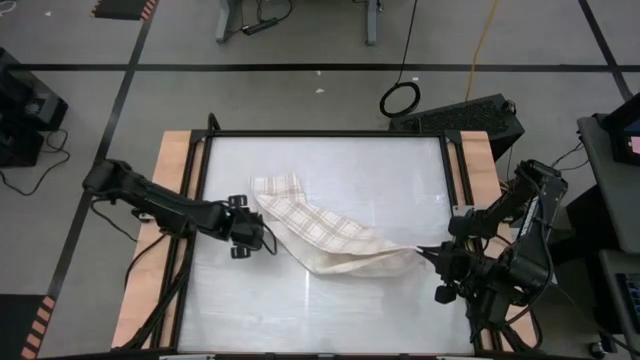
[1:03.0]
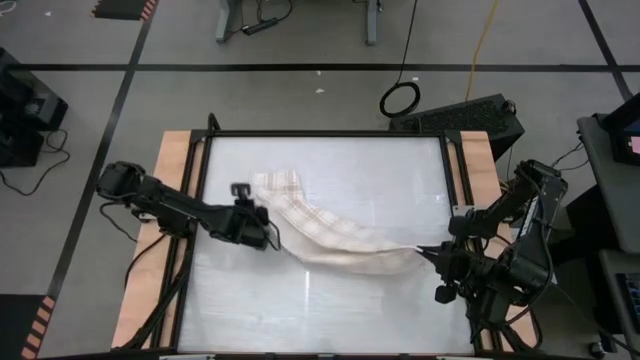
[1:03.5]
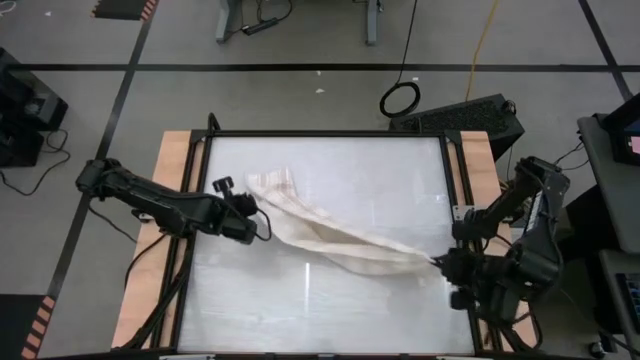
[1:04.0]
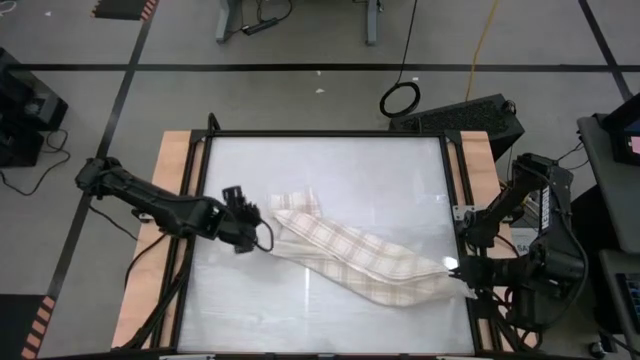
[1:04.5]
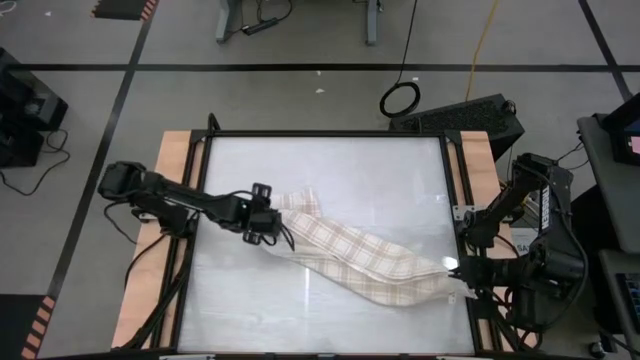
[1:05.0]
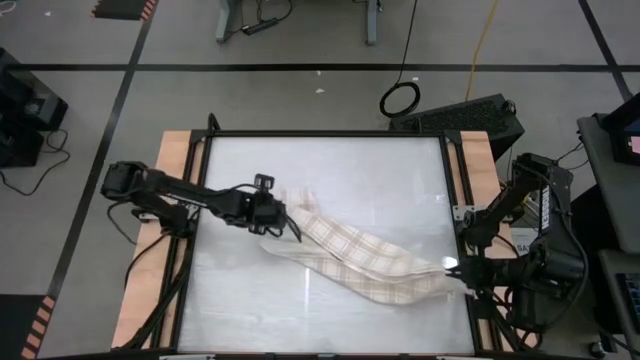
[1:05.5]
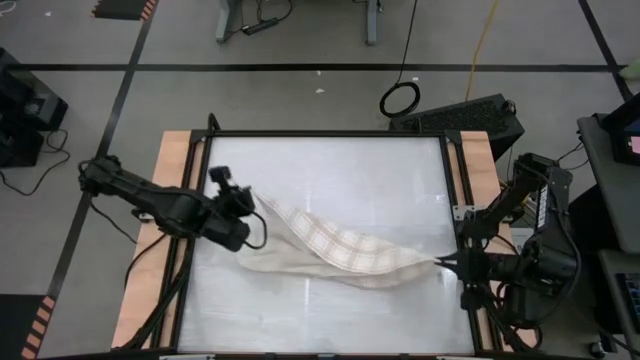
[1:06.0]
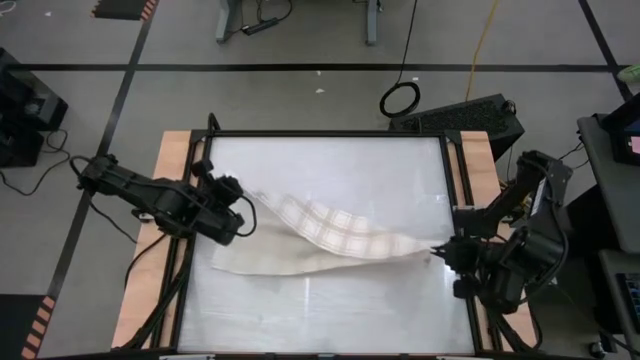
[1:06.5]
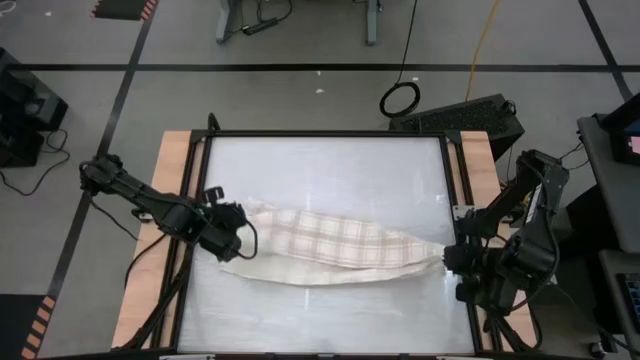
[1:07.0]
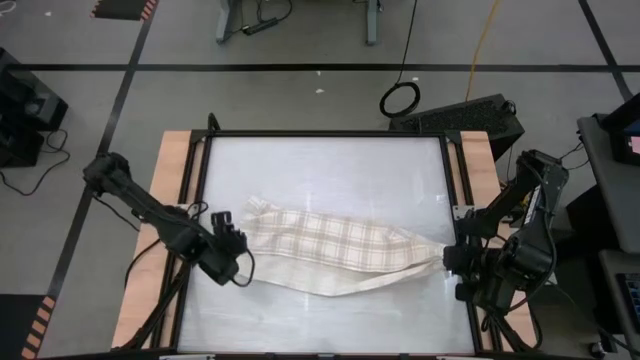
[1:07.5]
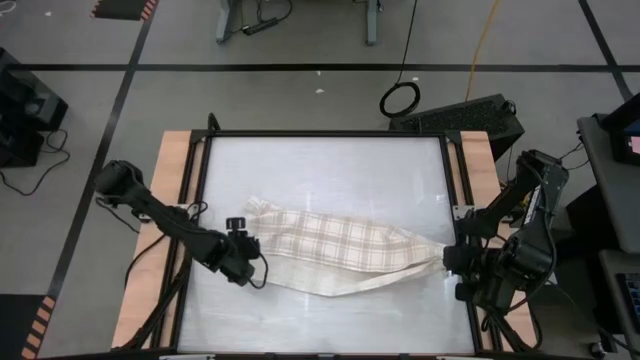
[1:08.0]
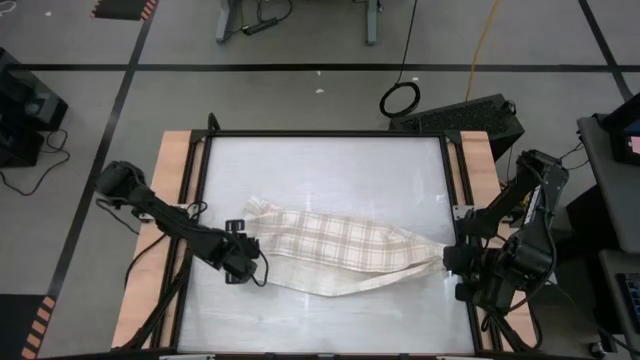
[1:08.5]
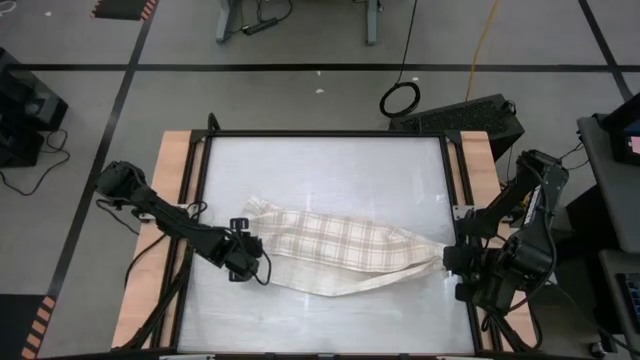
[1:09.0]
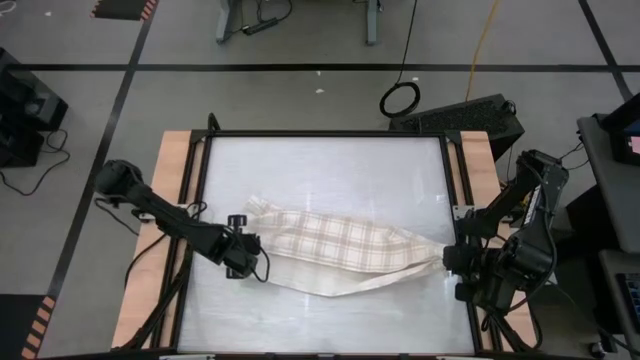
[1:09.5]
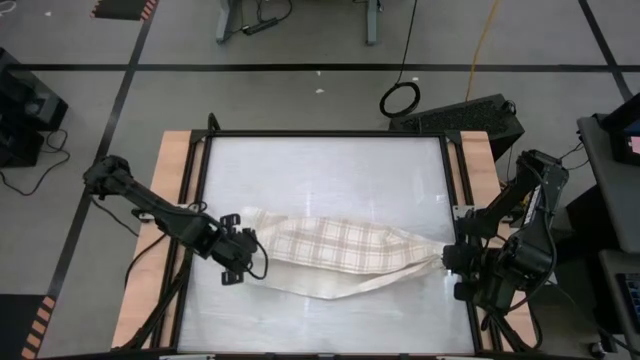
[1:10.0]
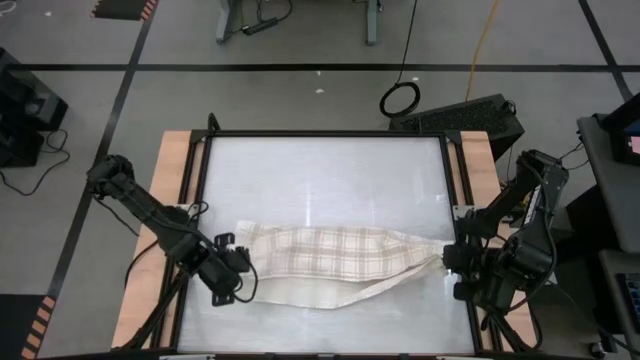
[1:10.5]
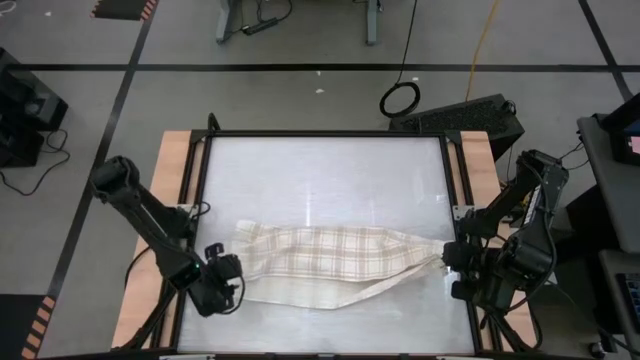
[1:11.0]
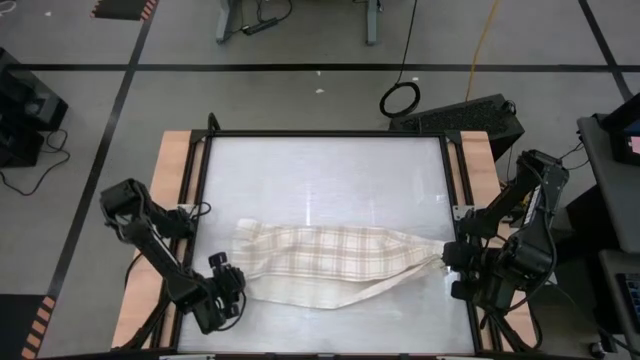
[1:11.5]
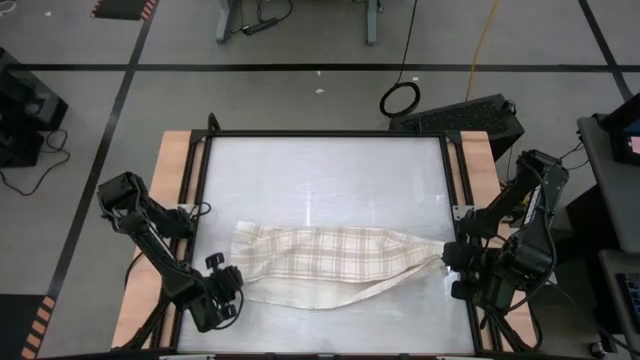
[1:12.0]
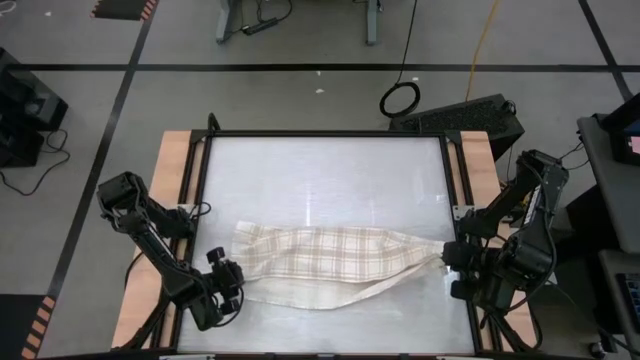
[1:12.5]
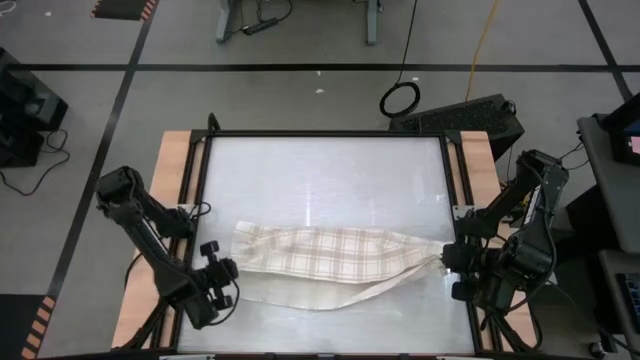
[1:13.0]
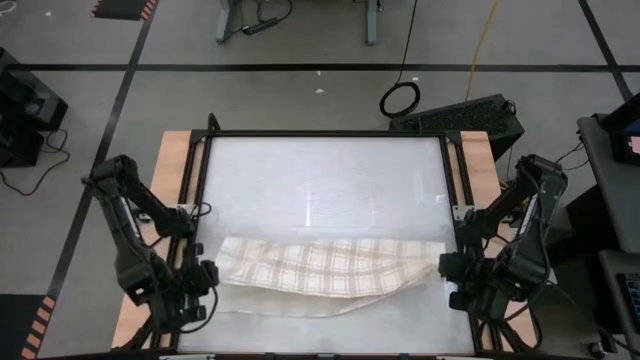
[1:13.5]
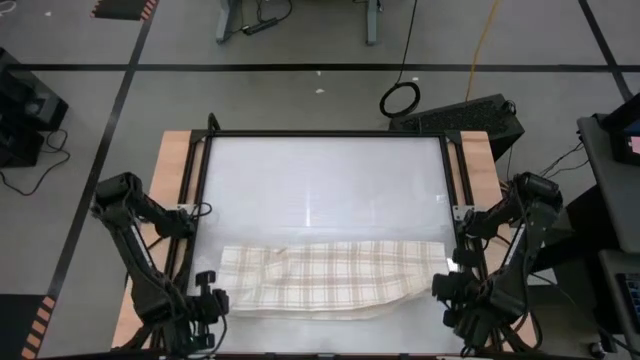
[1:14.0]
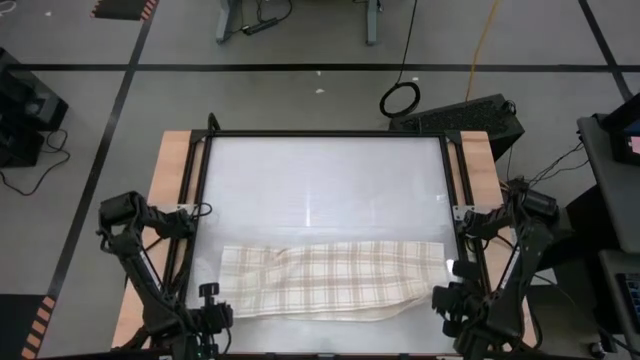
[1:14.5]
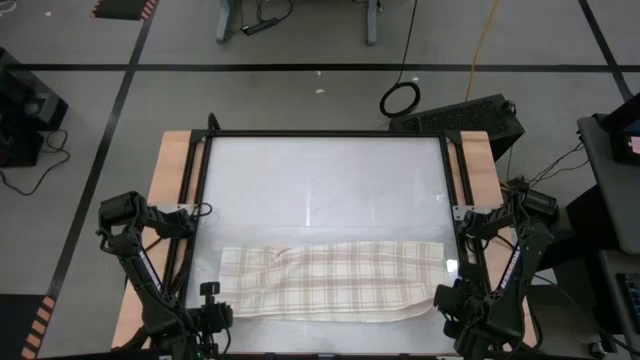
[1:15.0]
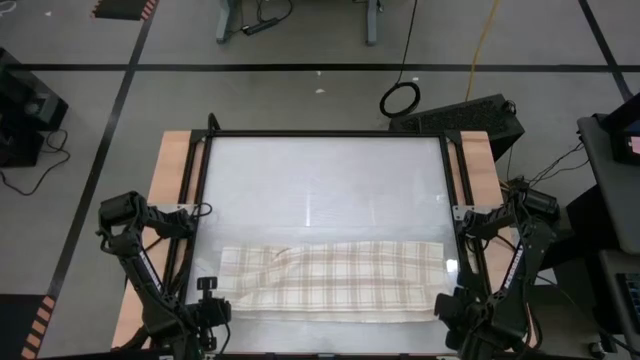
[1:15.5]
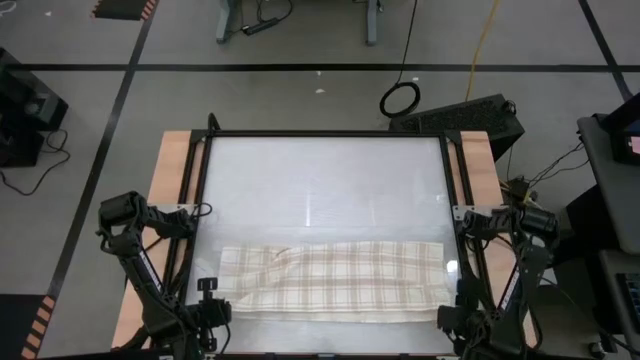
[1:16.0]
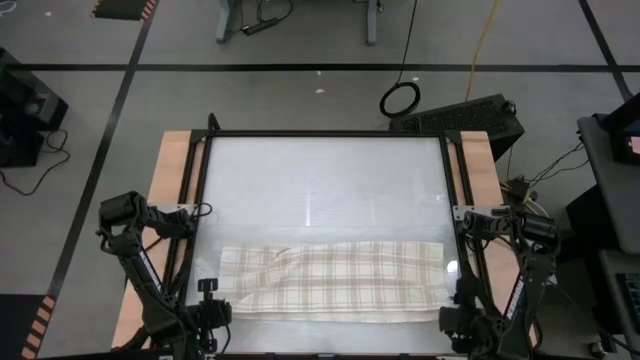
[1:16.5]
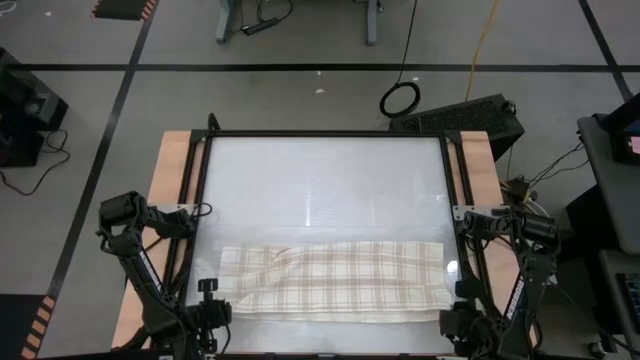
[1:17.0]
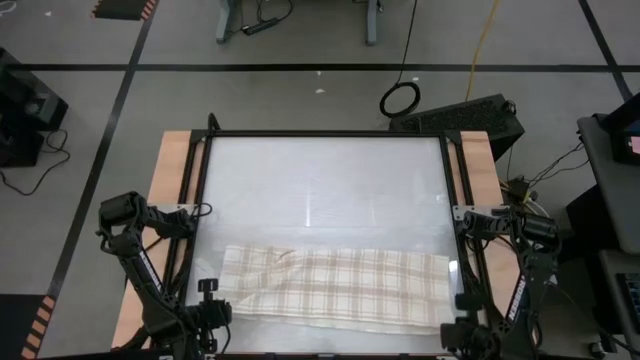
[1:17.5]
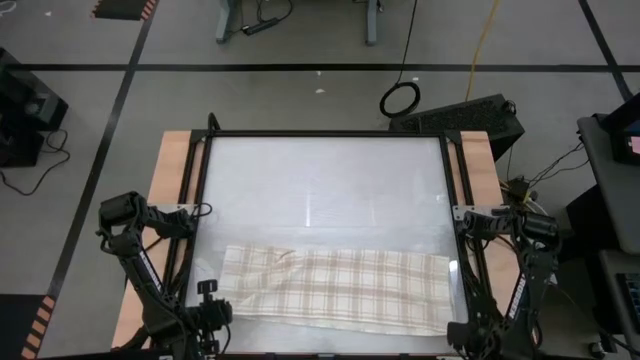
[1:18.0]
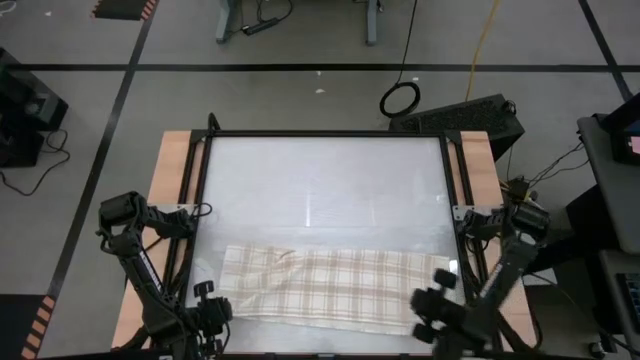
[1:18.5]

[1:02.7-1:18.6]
Task: Roll towel
Roll the white-brown patterned towel

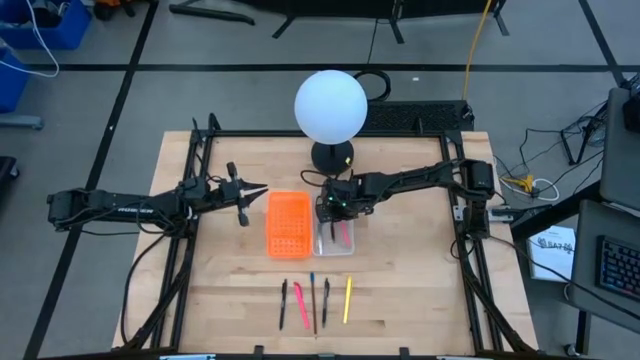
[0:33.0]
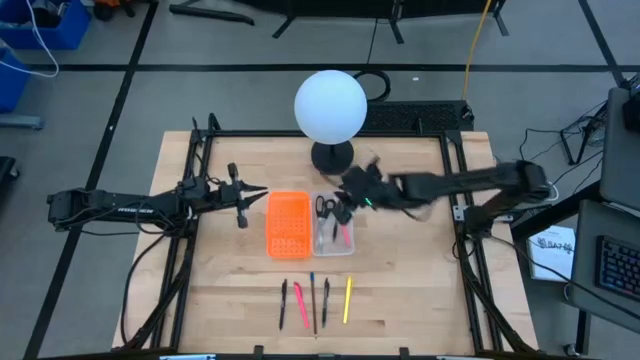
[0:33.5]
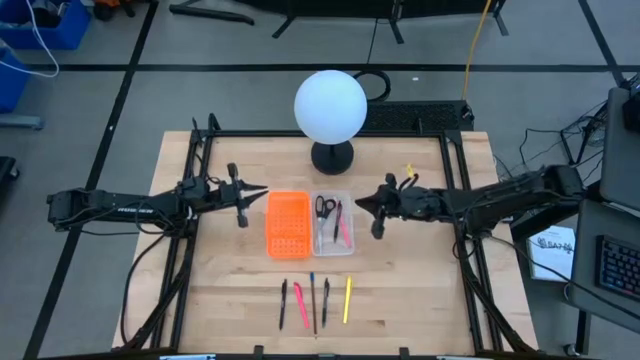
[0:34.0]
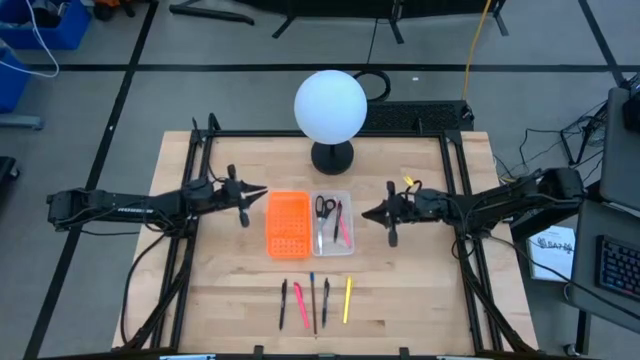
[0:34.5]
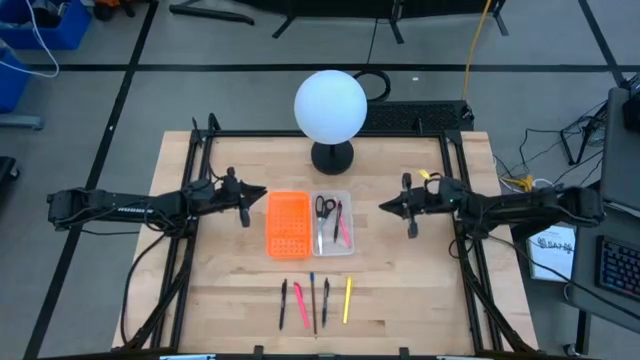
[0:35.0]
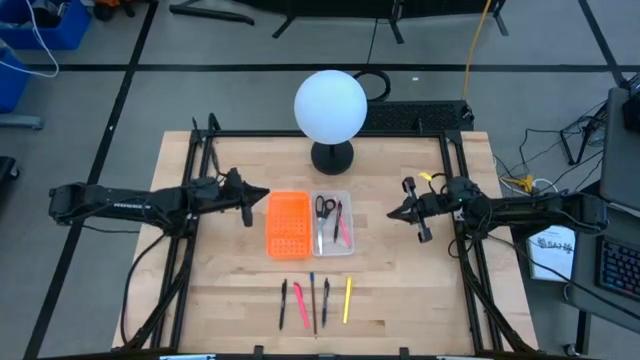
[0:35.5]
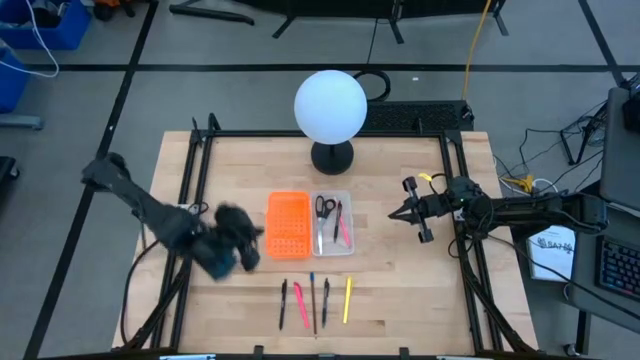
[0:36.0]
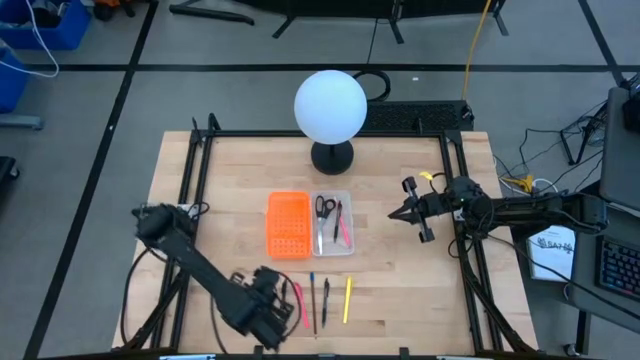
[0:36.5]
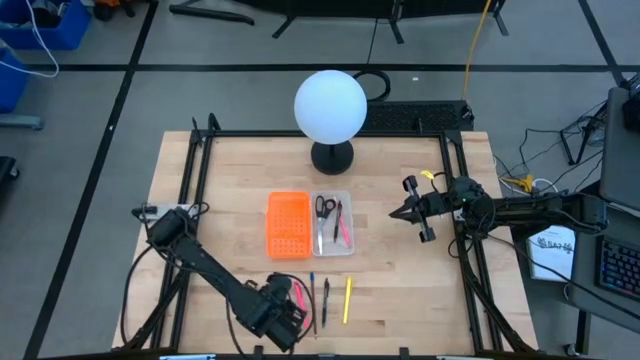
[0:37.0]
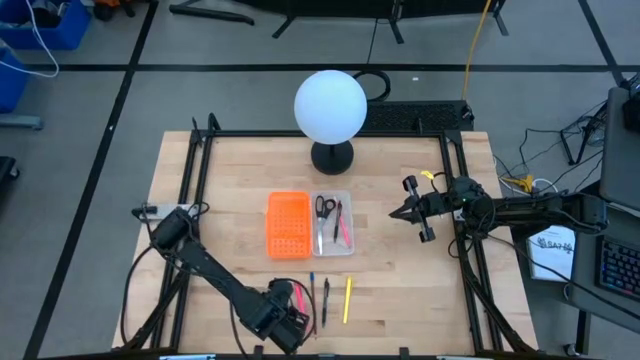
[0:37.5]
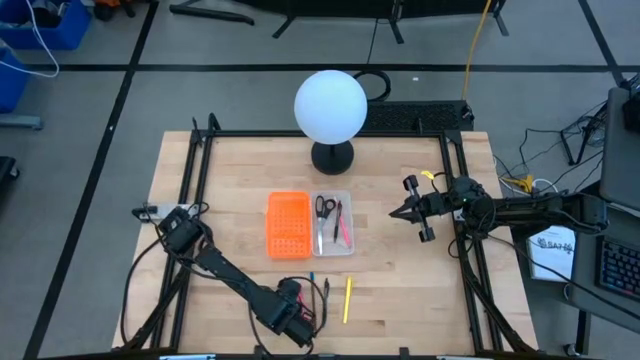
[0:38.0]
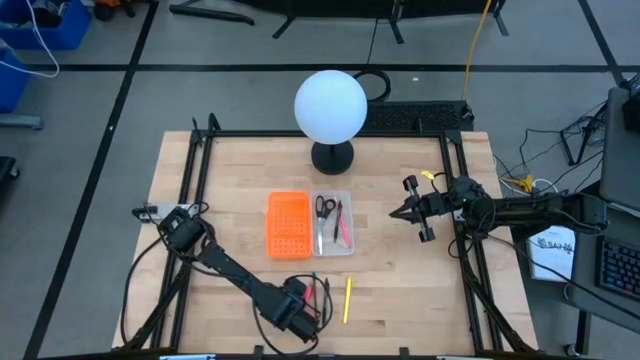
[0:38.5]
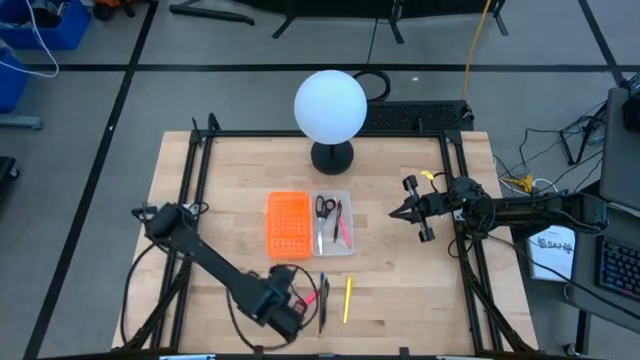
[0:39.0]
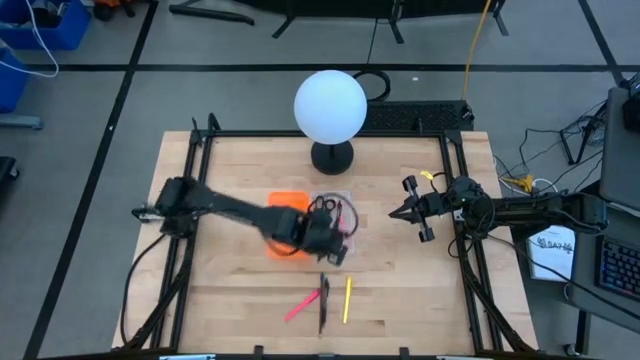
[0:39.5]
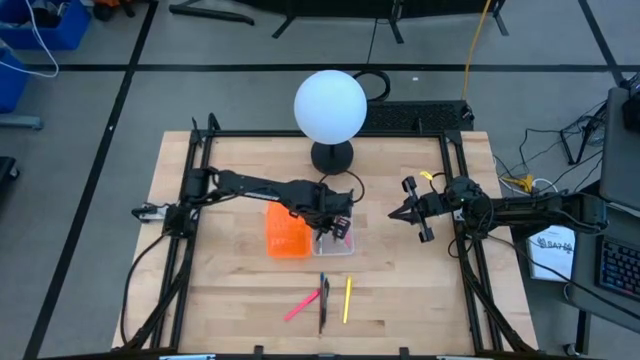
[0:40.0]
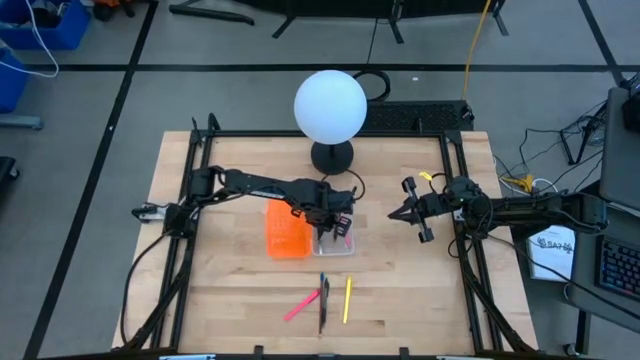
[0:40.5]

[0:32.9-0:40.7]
Task: Pick & place school supplies into a supply box
Put the left black pen into the supply box
